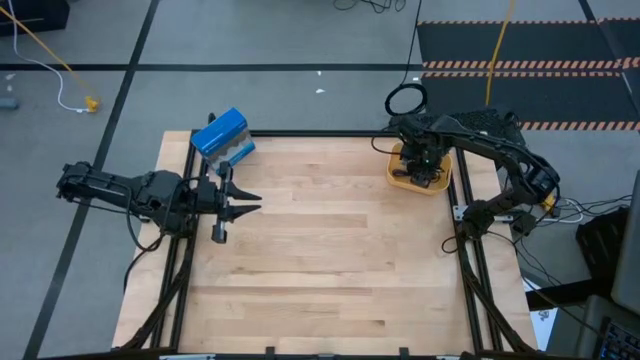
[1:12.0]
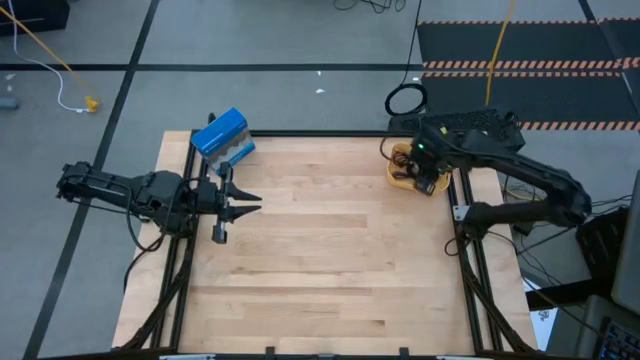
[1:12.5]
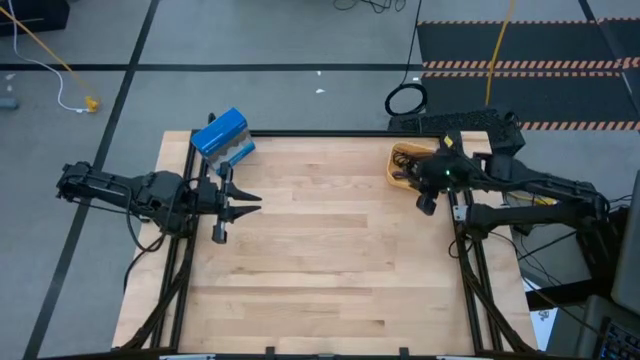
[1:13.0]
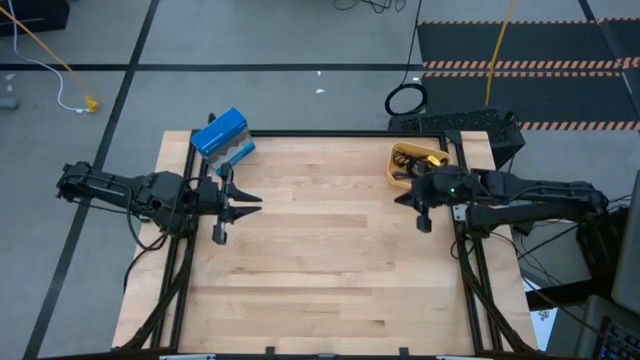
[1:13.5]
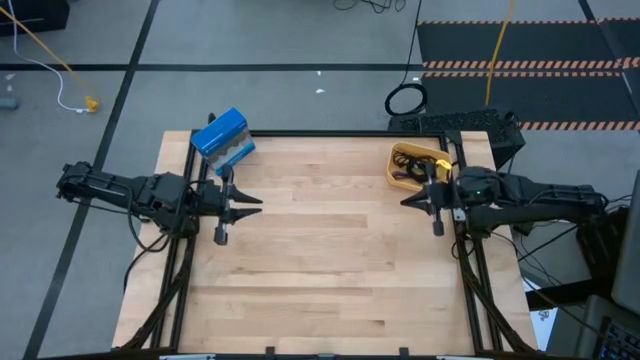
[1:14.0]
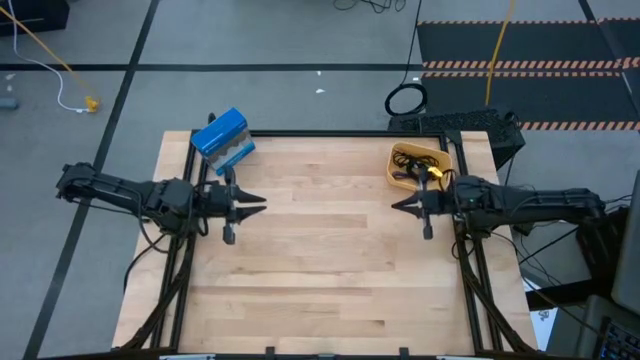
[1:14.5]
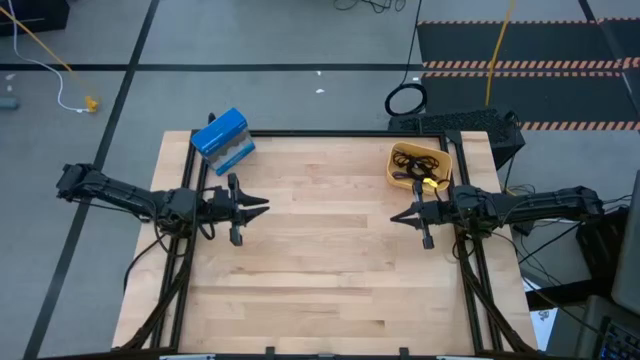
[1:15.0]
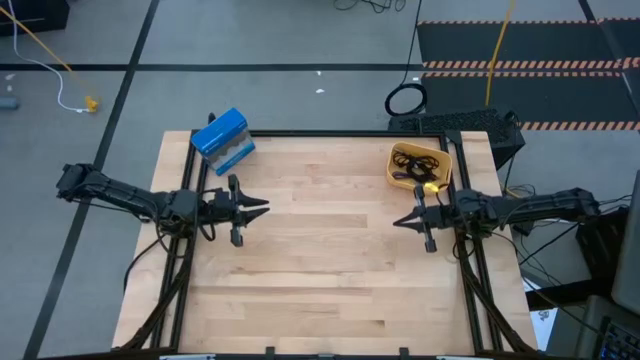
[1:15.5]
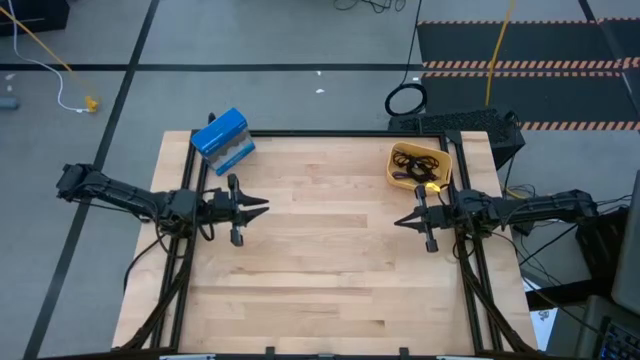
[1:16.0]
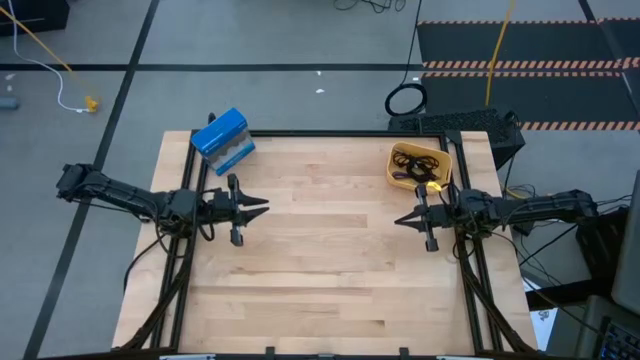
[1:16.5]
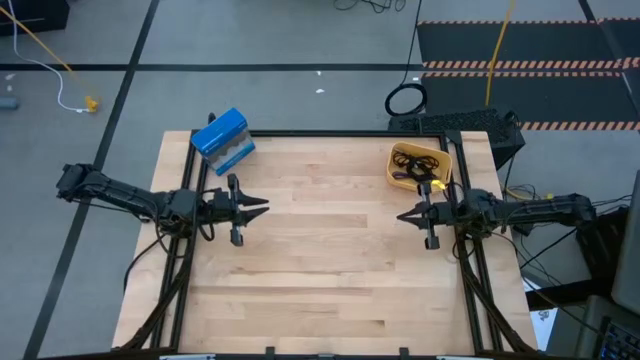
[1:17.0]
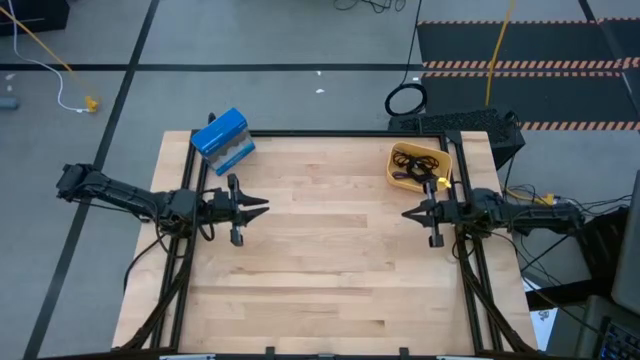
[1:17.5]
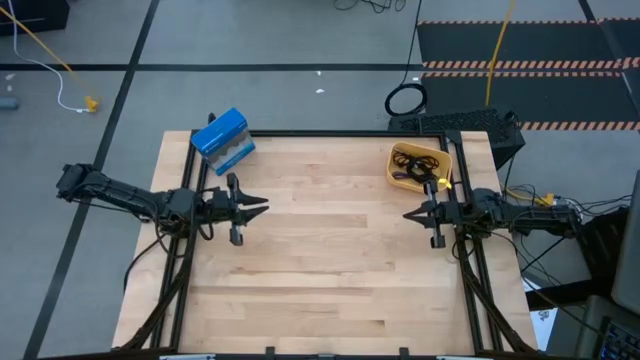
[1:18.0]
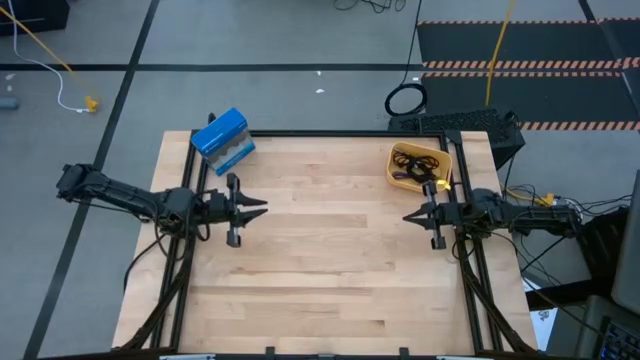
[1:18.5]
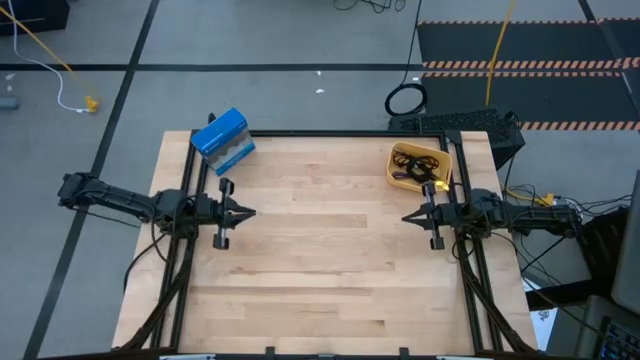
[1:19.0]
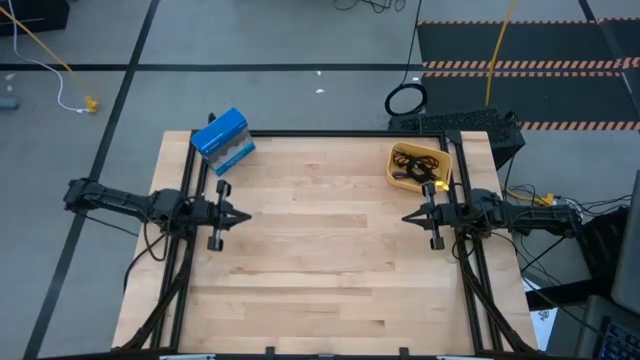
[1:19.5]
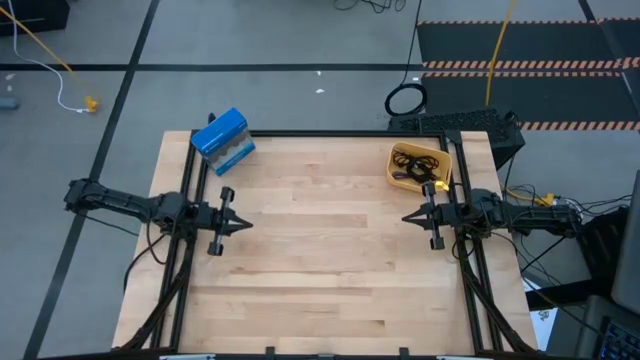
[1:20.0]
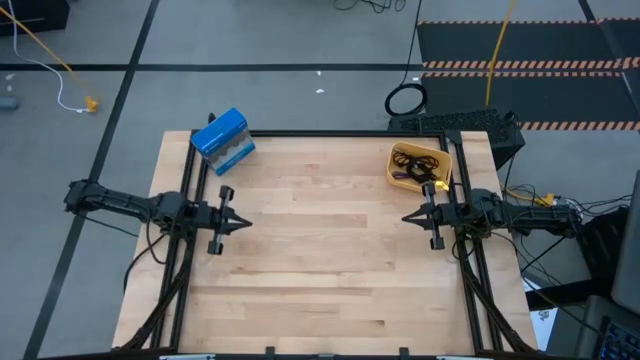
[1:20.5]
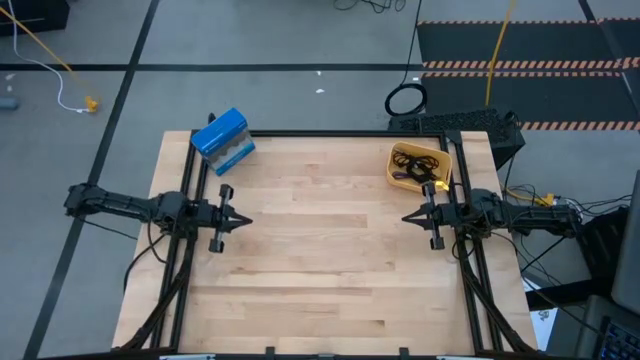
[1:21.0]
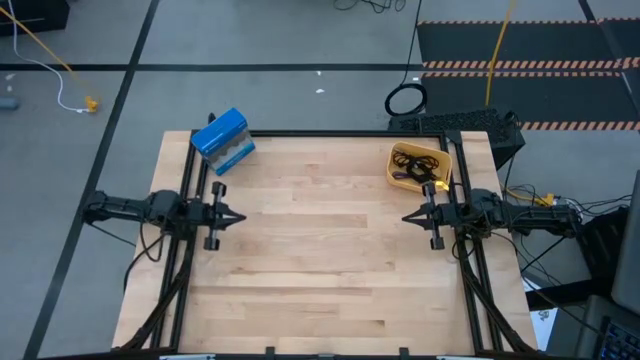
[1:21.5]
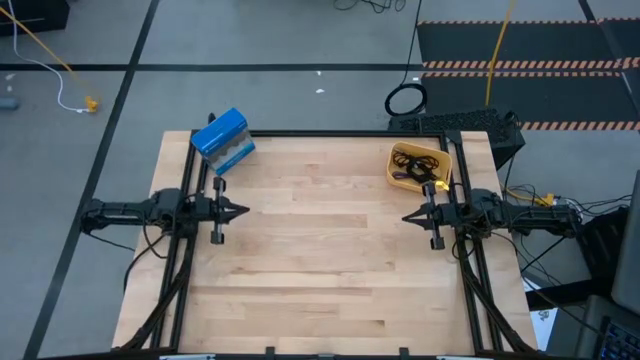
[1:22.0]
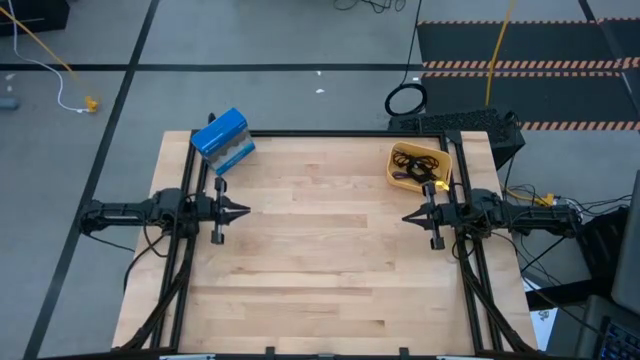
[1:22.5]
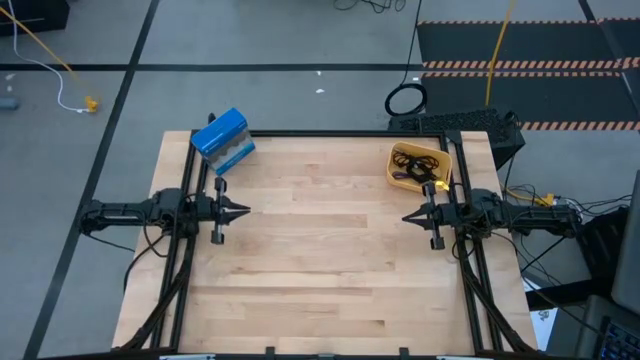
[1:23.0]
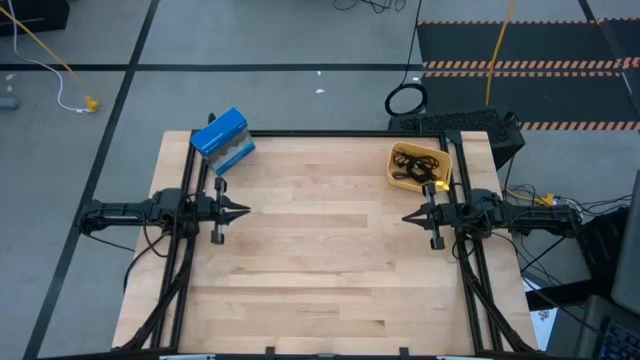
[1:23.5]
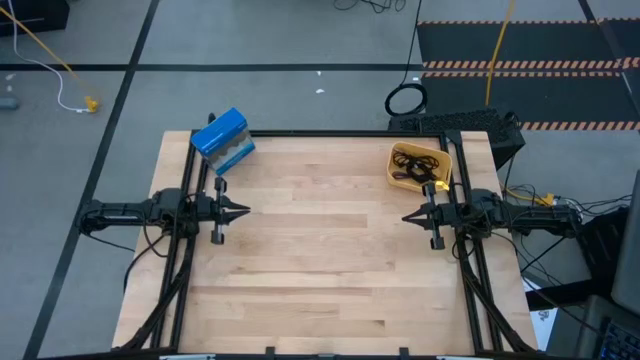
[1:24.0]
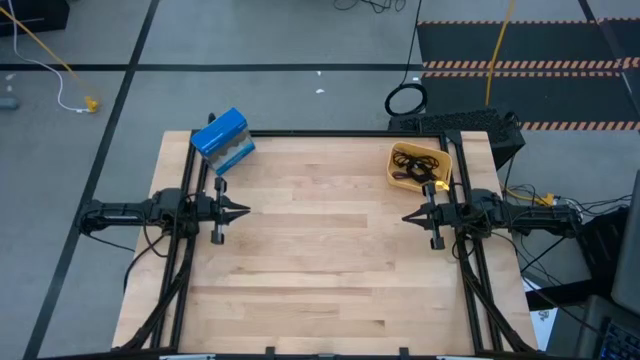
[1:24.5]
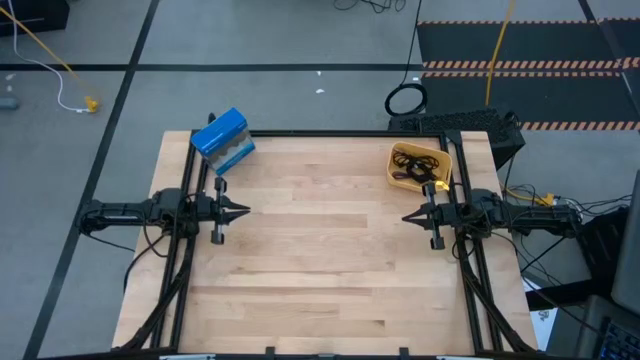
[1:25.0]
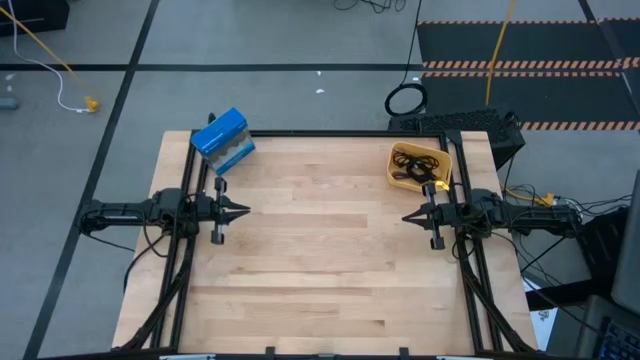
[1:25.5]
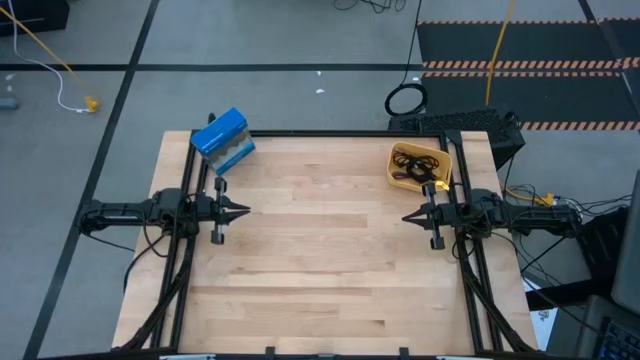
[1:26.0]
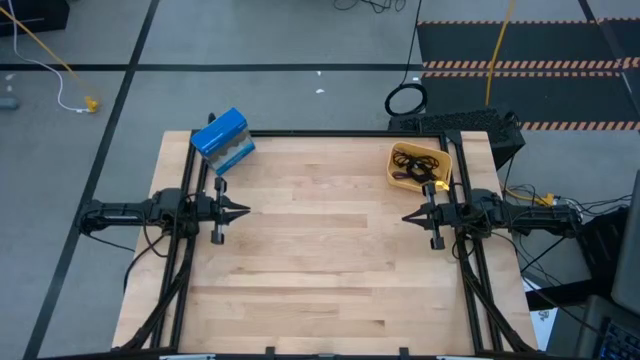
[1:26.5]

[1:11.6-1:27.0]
Task: Pick and place USB-C Cables
Return to Home Position

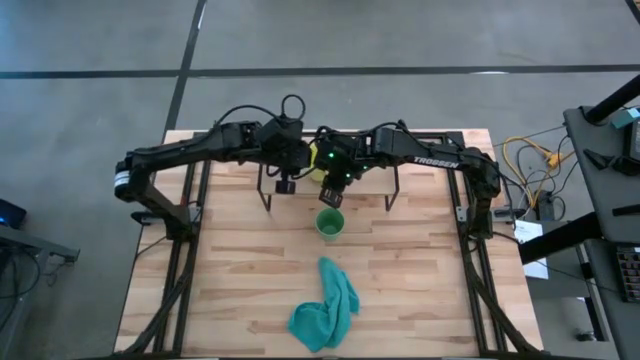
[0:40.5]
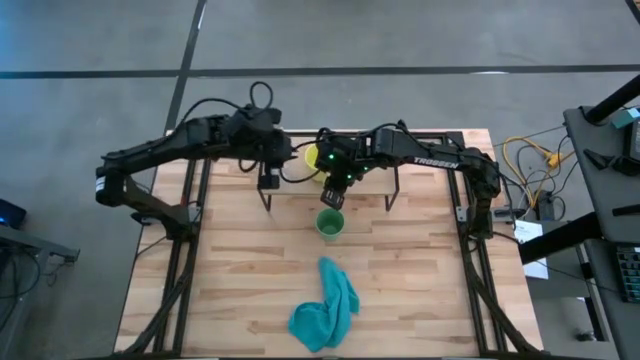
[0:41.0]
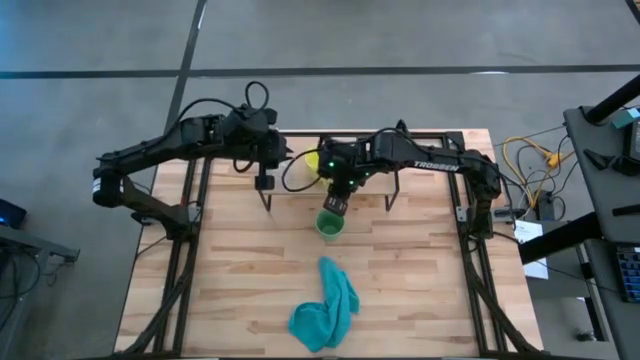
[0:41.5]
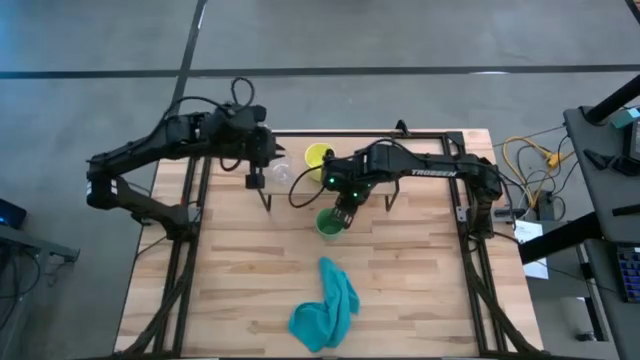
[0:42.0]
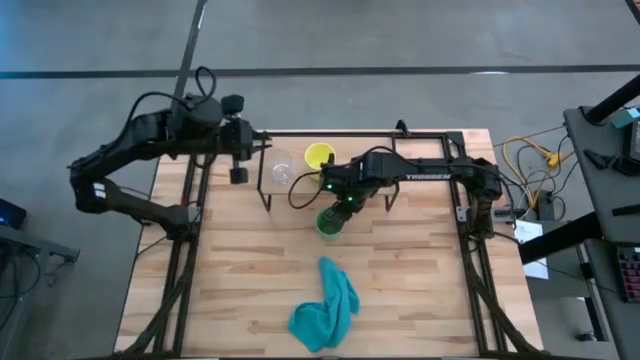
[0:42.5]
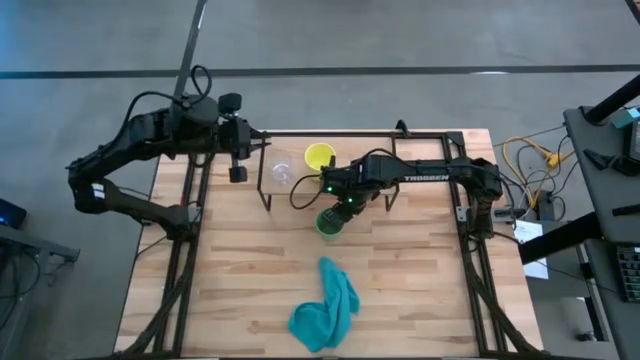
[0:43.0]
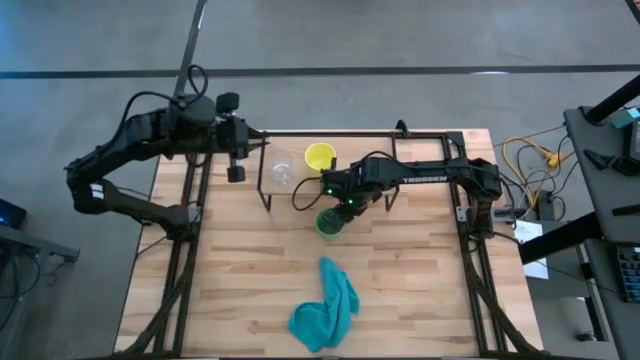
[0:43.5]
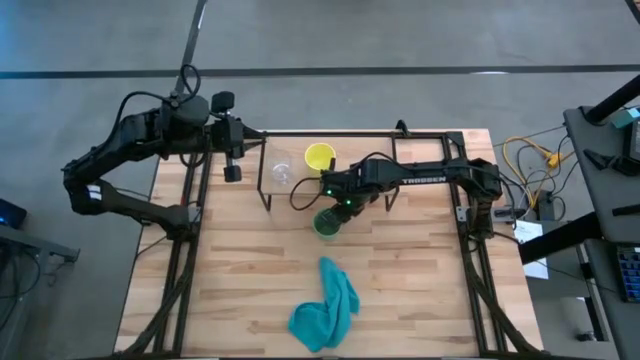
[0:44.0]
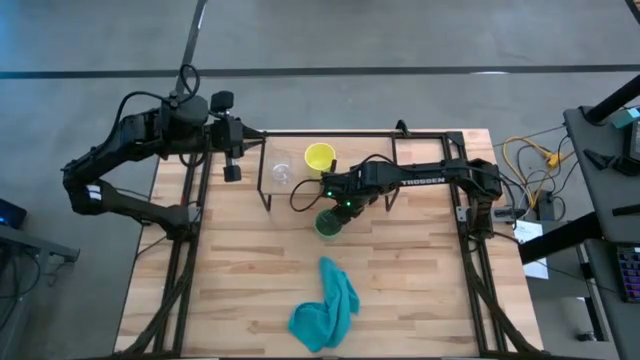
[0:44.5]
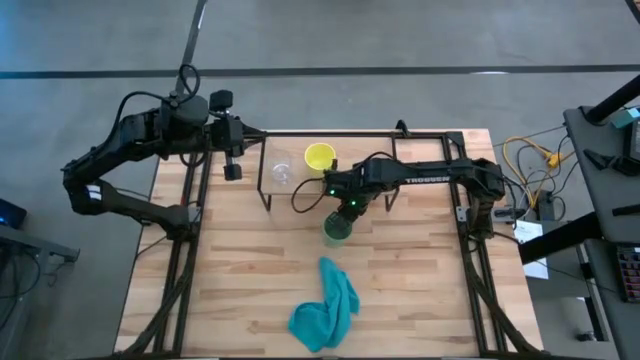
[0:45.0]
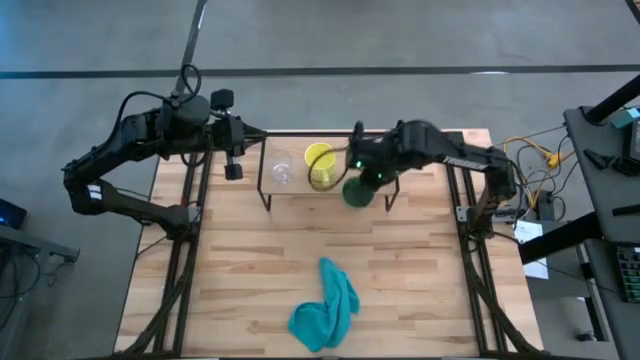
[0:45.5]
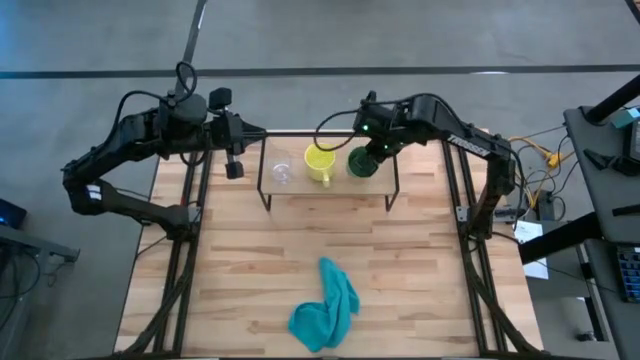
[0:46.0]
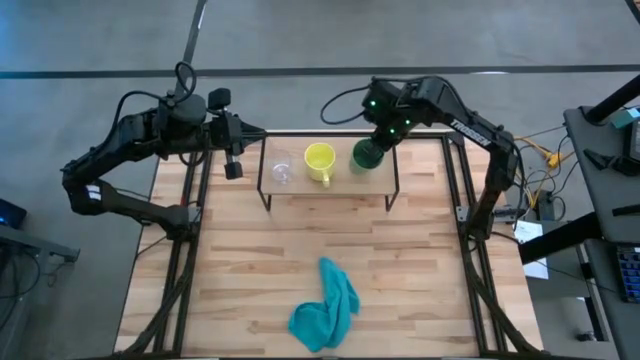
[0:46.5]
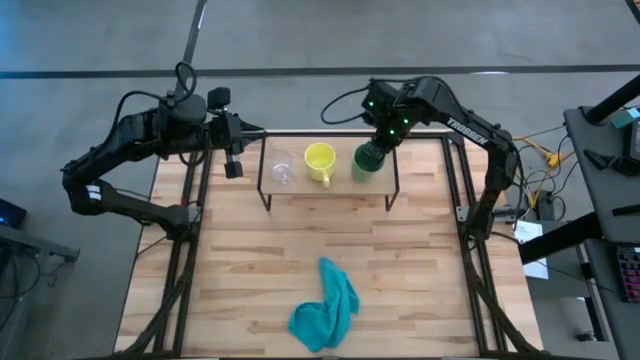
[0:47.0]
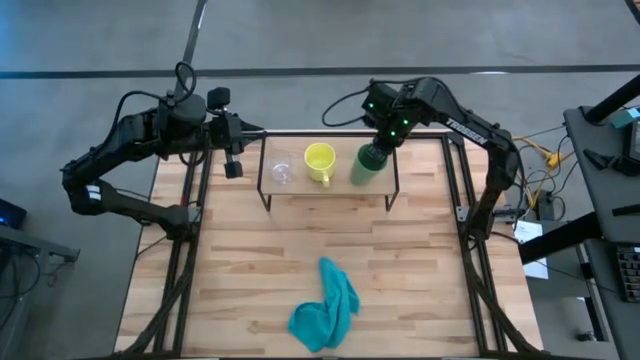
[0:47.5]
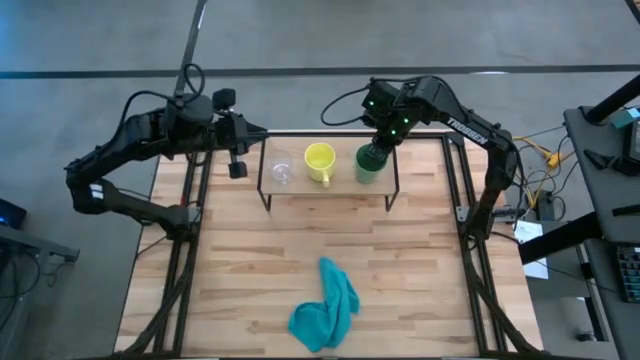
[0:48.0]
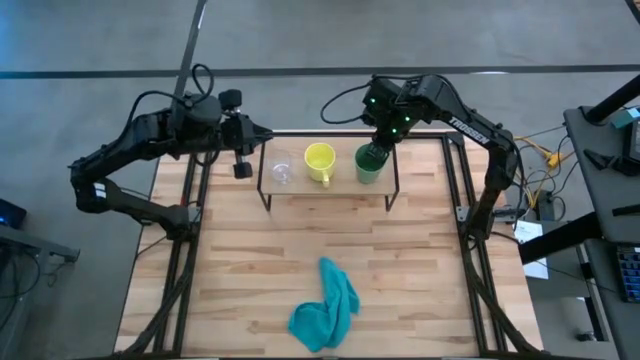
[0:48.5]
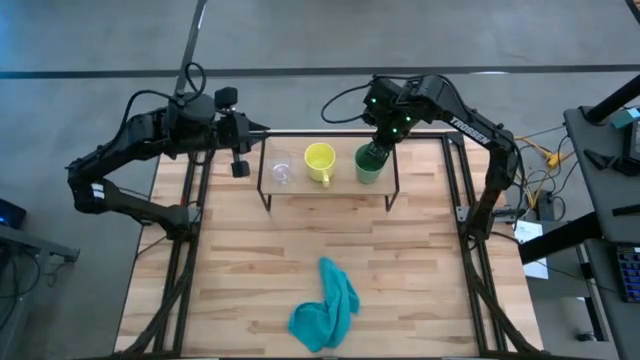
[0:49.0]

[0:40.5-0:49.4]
Task: Stack small to large cups/mugs on shelf
Put the green cup on the shelf
